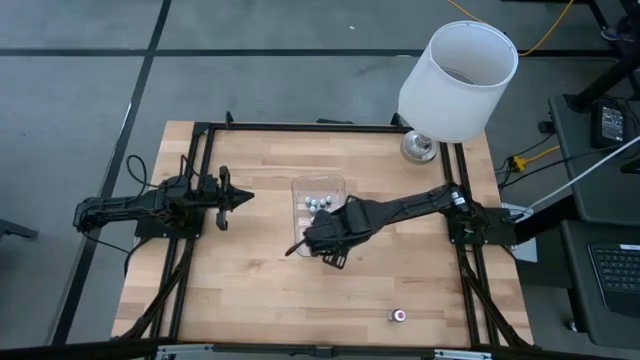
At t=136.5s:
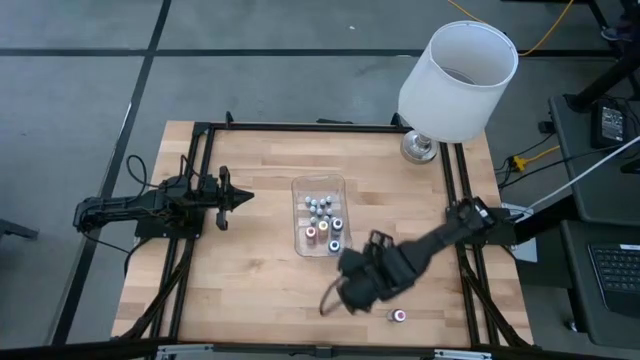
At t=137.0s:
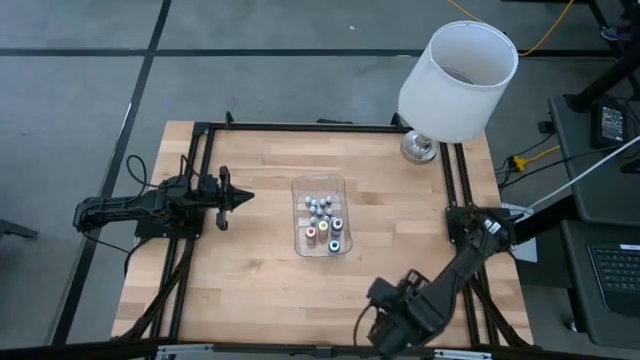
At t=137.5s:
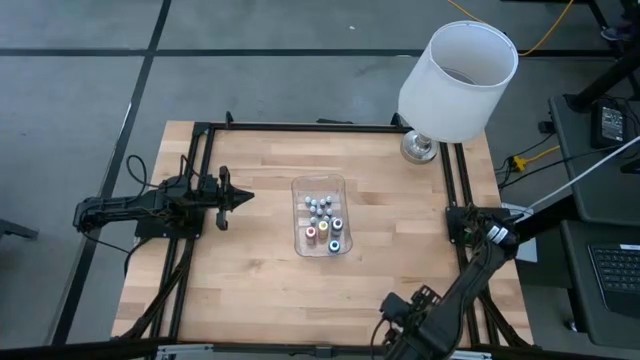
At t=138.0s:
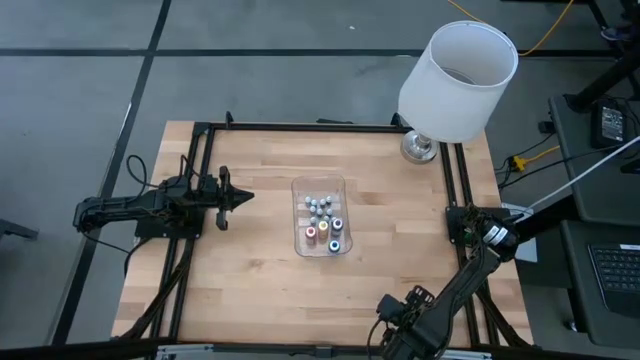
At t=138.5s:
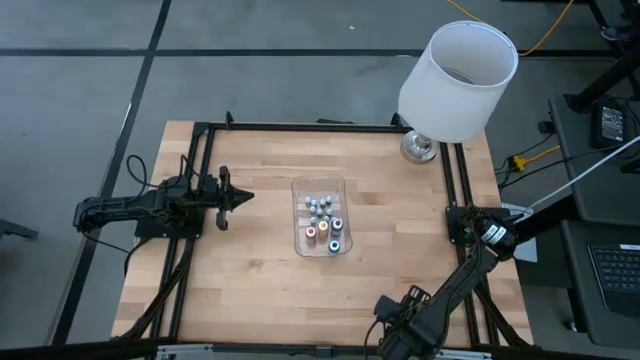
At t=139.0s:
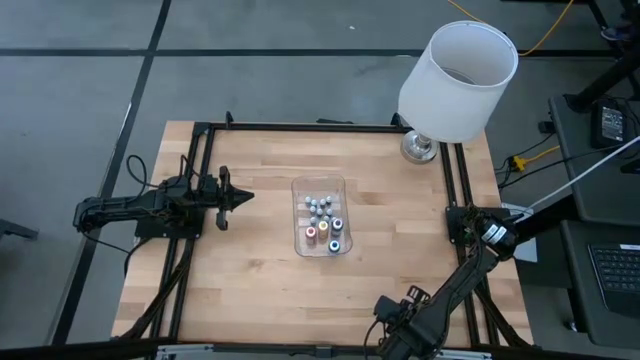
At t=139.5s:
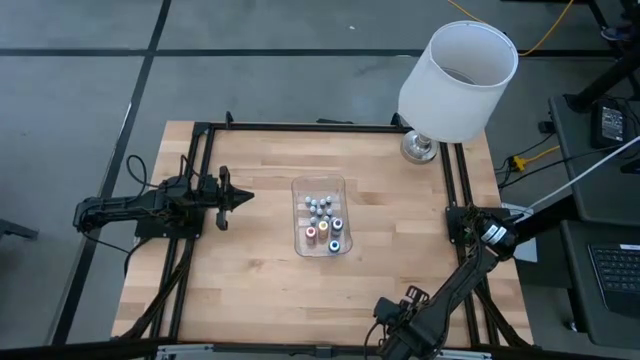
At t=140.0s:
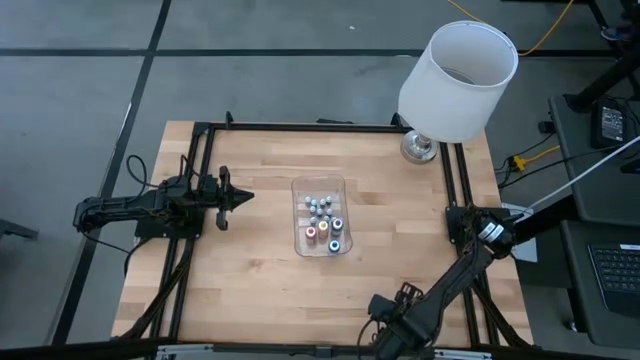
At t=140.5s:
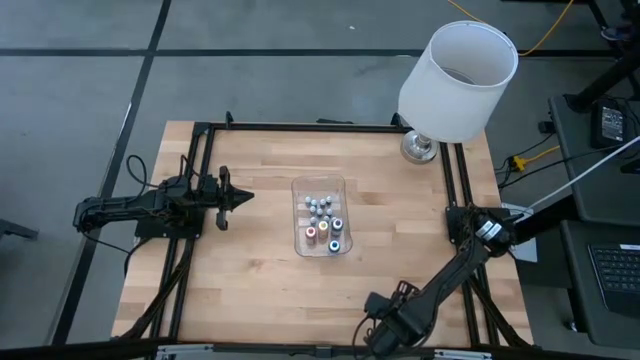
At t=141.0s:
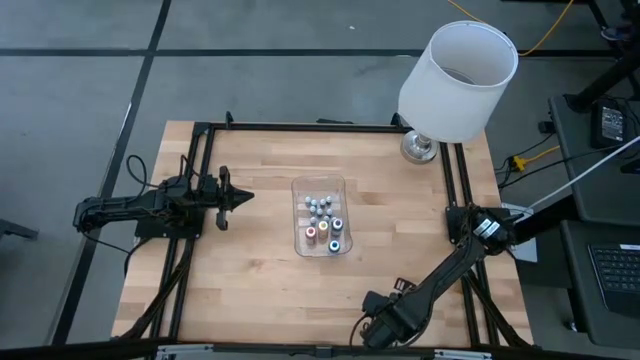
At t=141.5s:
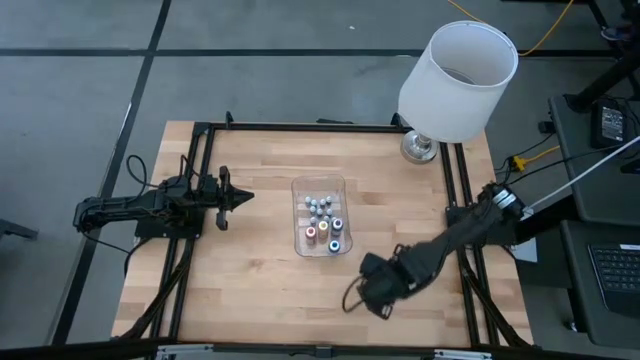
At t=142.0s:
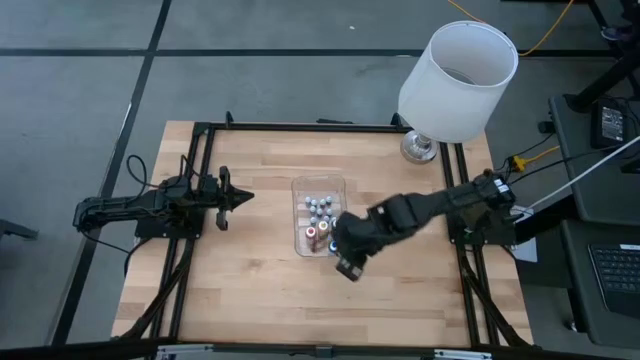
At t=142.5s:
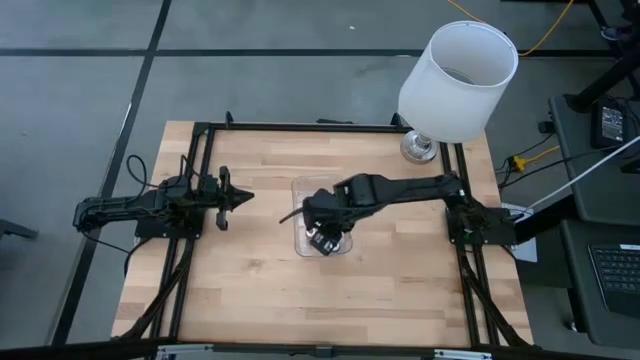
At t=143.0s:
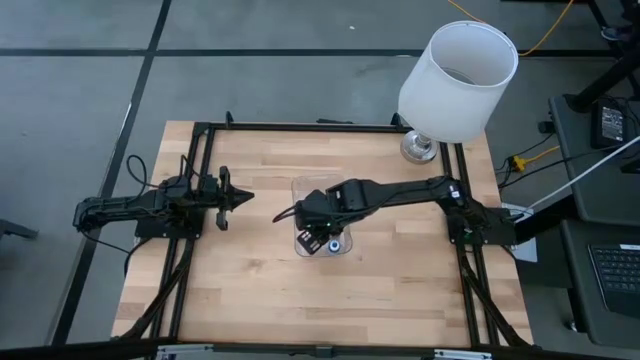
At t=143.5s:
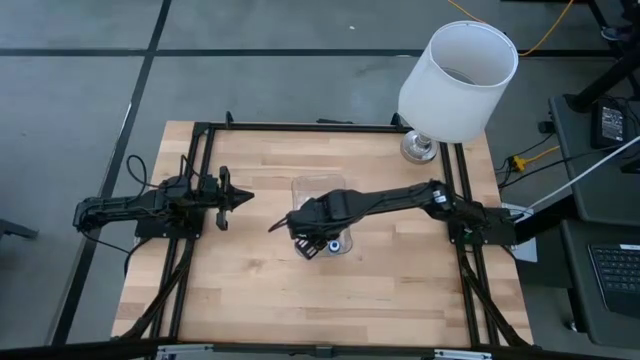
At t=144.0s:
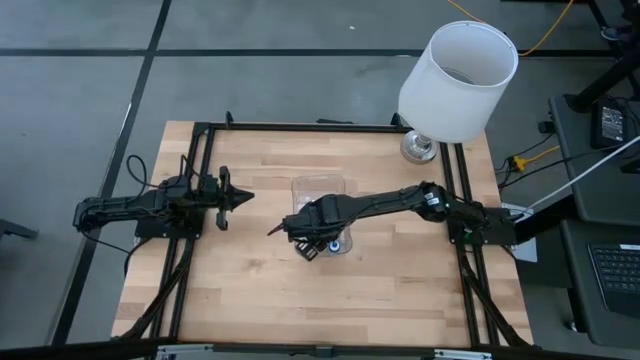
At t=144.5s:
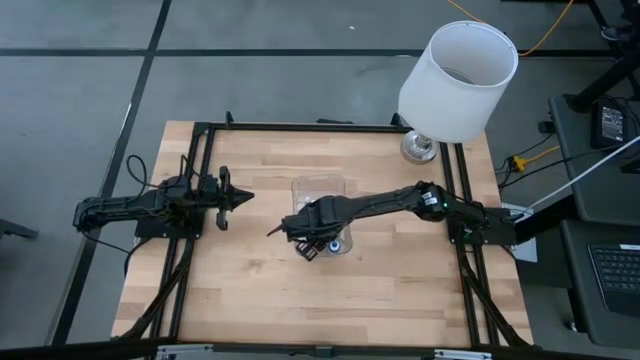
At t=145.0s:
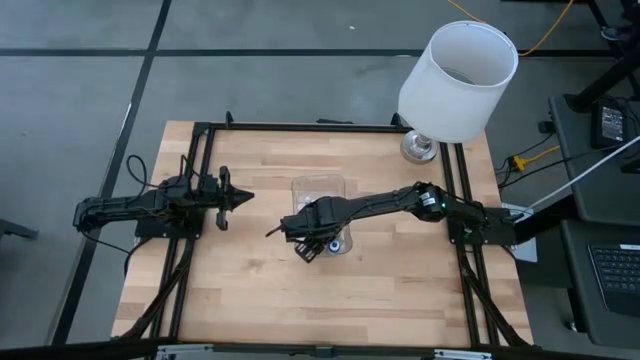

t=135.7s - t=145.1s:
Task: Pick & Place food coloring
Put the large pink food coloring into the transparent bin

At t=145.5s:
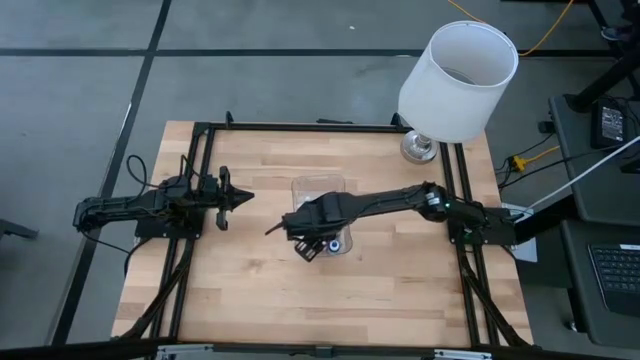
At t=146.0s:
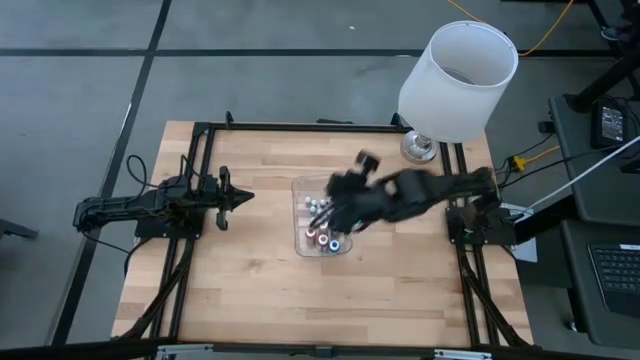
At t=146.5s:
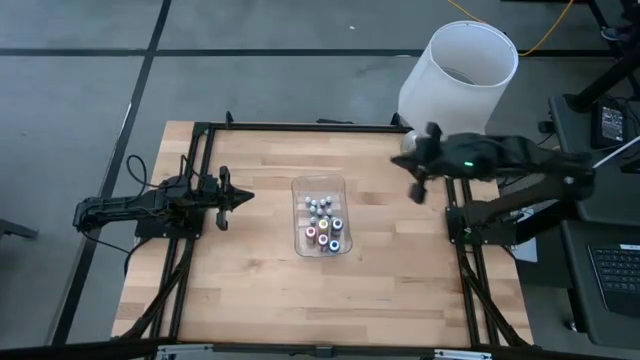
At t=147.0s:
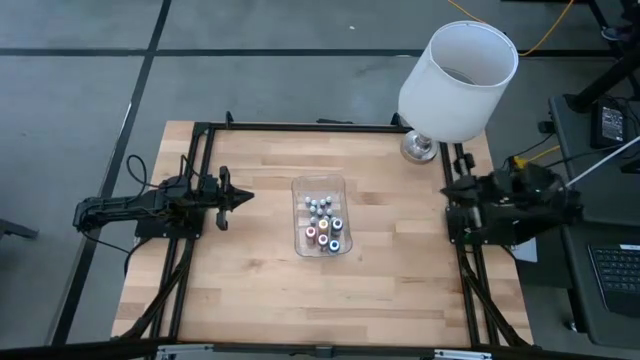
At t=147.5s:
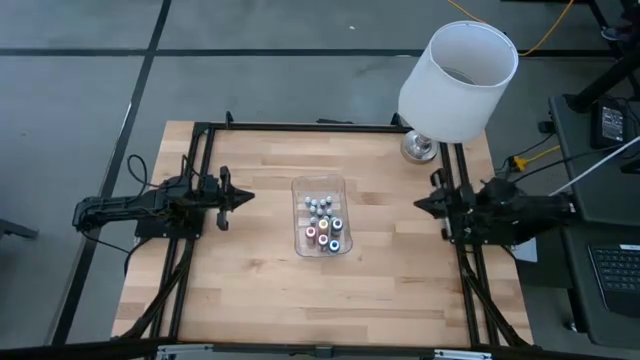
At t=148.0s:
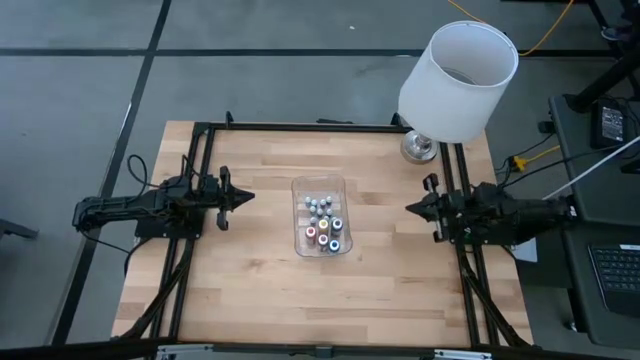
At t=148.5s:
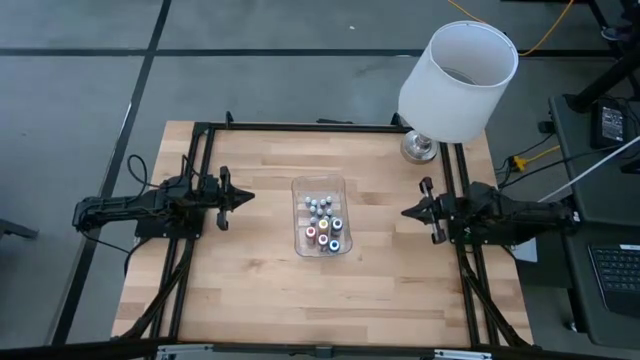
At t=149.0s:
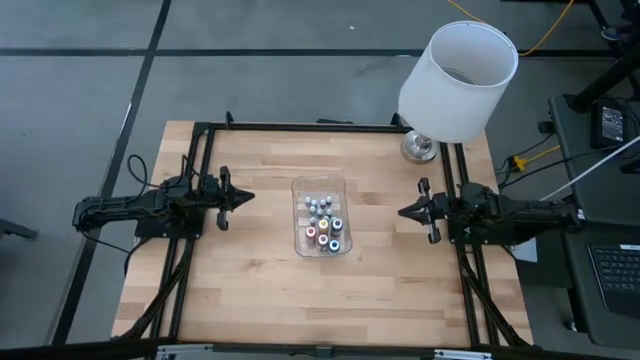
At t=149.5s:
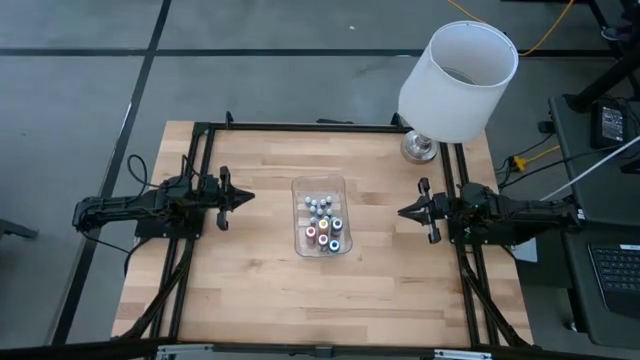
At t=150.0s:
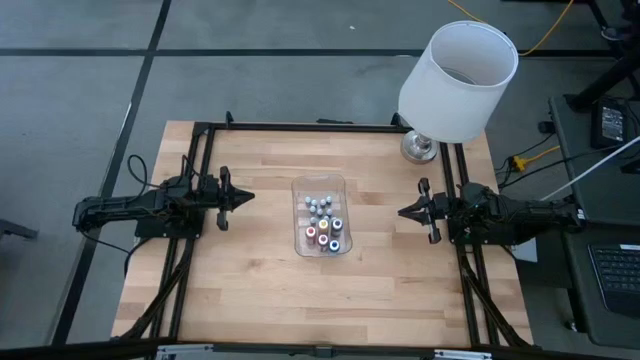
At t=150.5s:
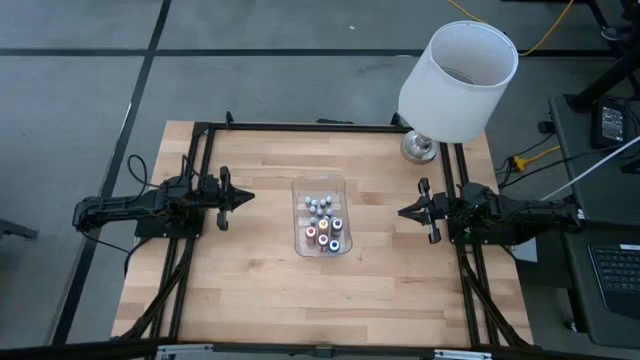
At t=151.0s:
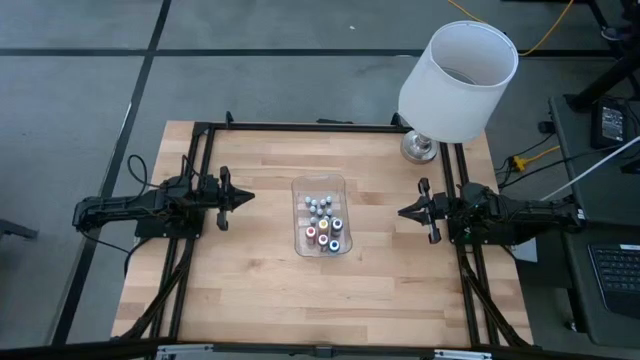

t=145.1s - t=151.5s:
Return to Home Position

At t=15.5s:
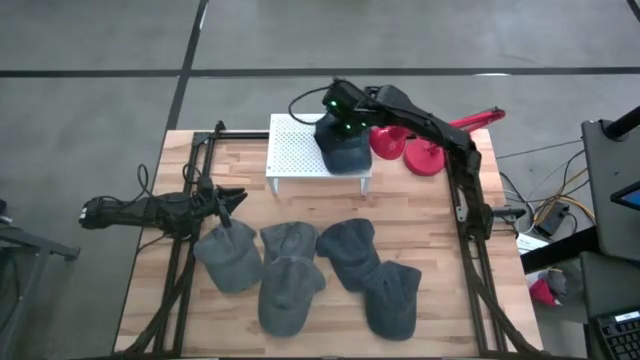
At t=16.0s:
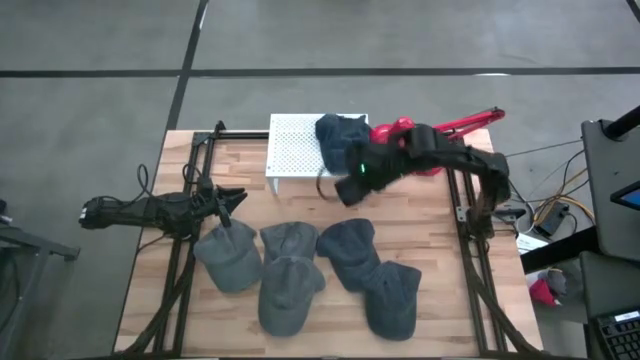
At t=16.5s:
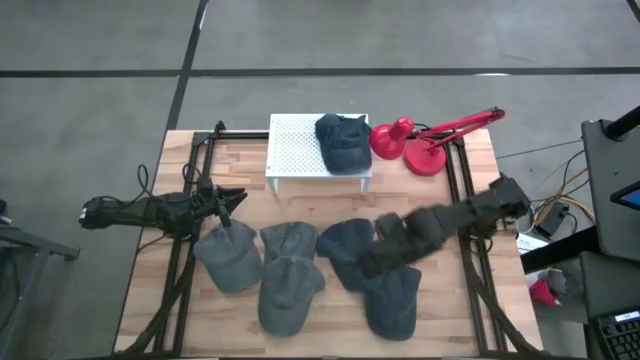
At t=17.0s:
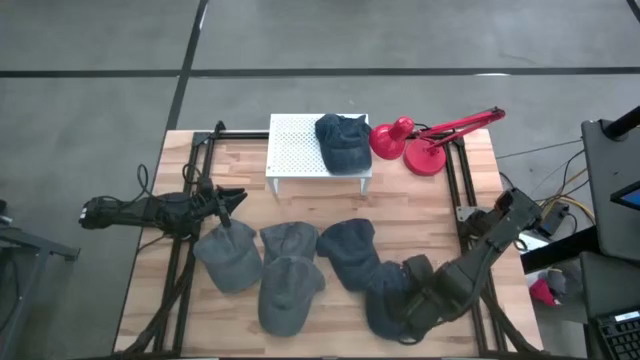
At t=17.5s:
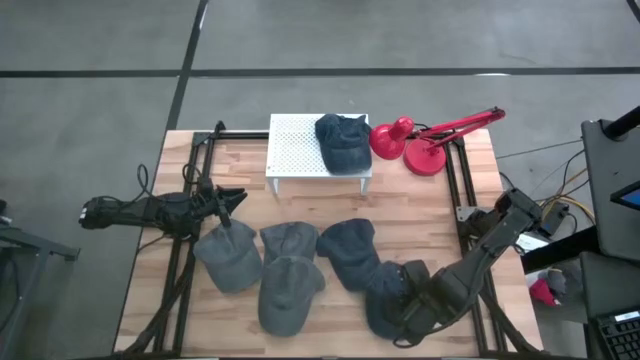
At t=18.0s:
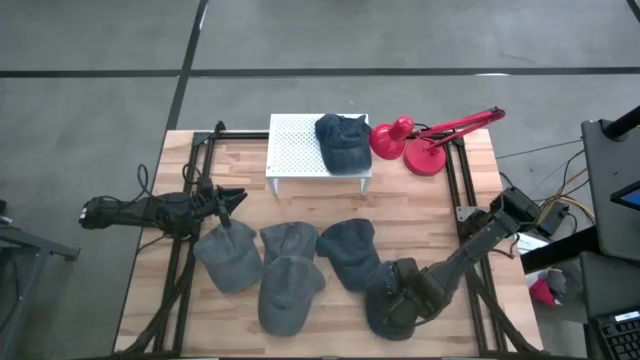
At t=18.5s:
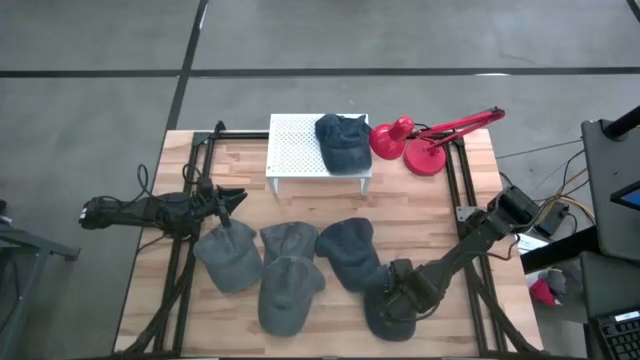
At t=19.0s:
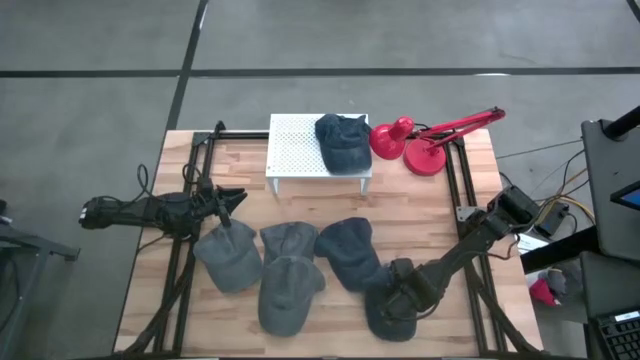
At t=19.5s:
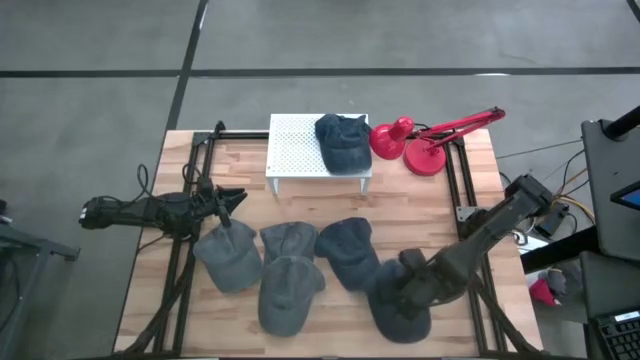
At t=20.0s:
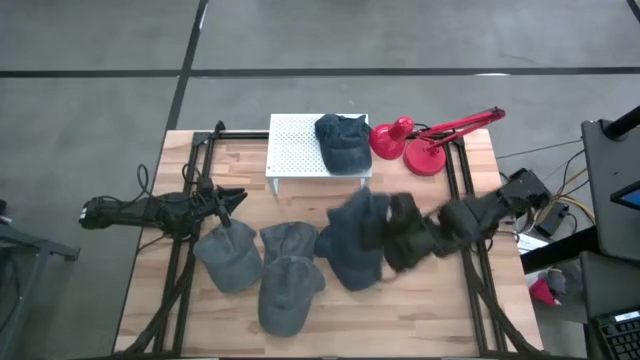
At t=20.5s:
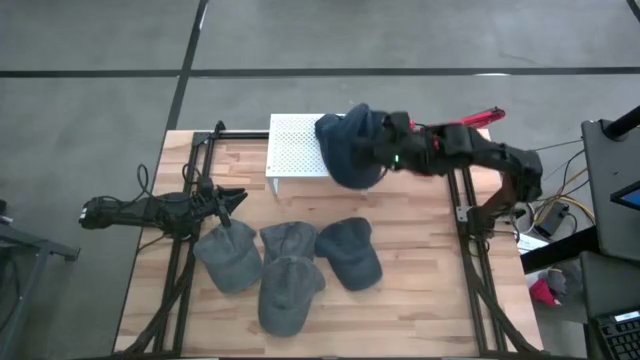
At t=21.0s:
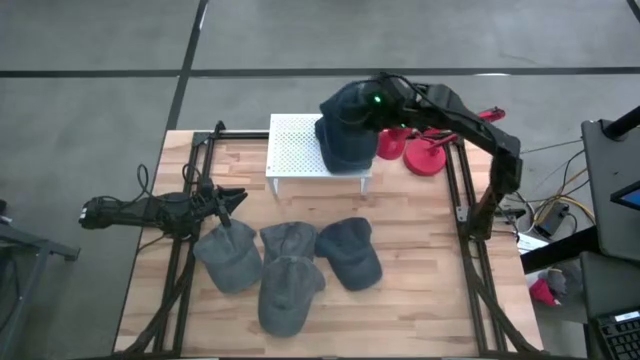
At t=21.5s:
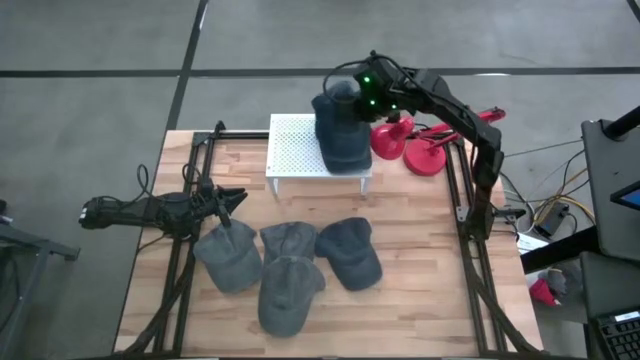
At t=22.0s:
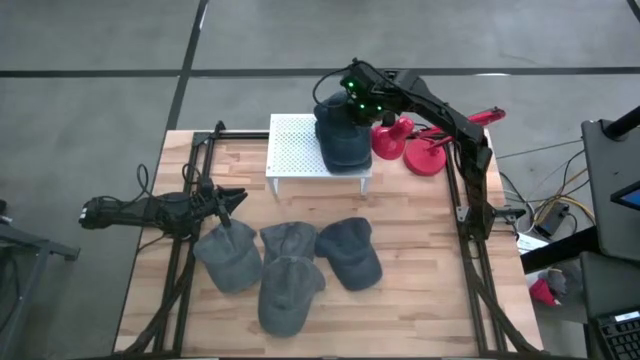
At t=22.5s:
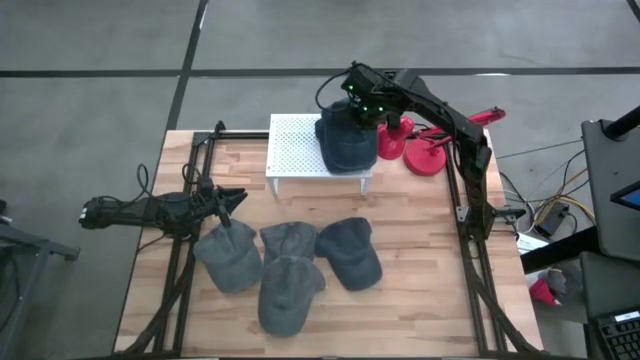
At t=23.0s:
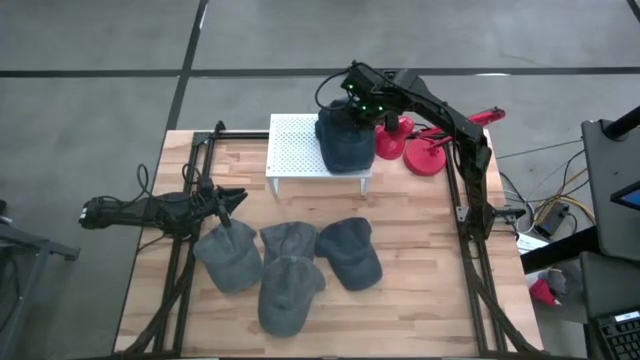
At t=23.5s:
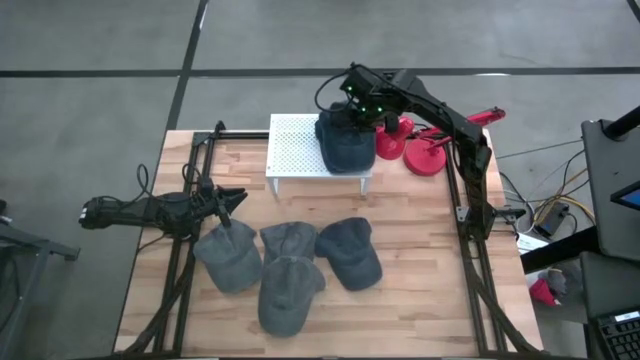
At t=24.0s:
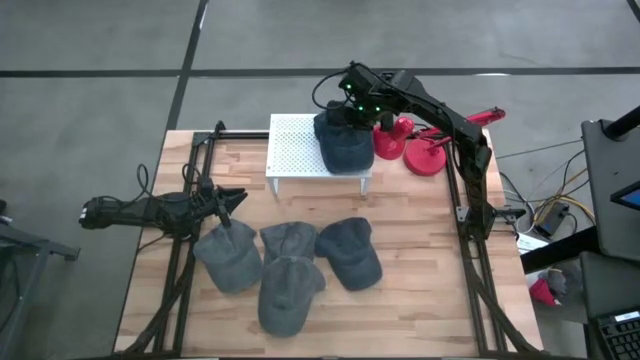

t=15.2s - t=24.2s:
Task: Pick & Place hat
Stack the bottom blue cap on the blue cap
